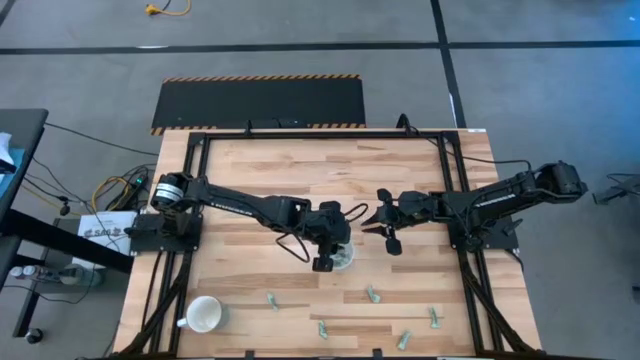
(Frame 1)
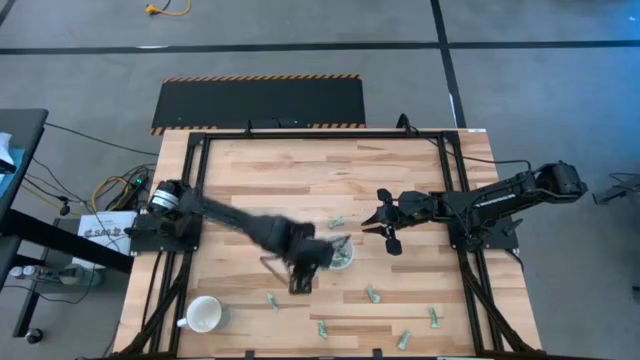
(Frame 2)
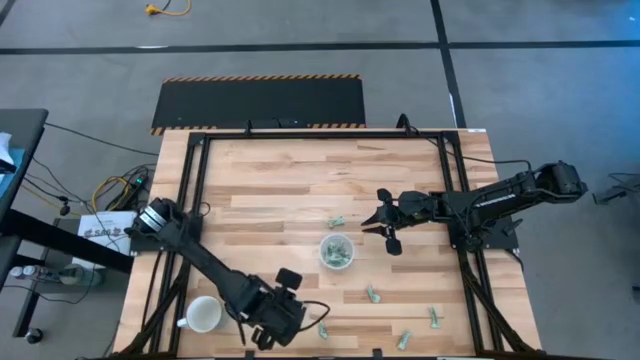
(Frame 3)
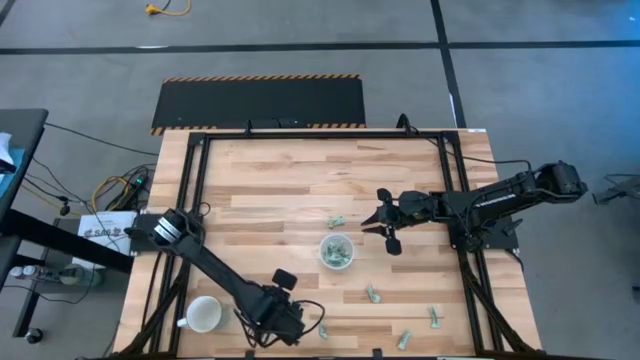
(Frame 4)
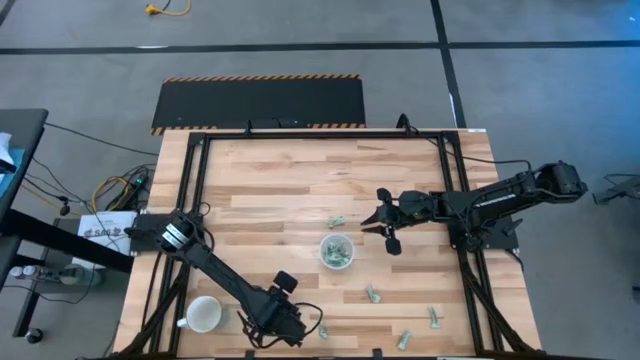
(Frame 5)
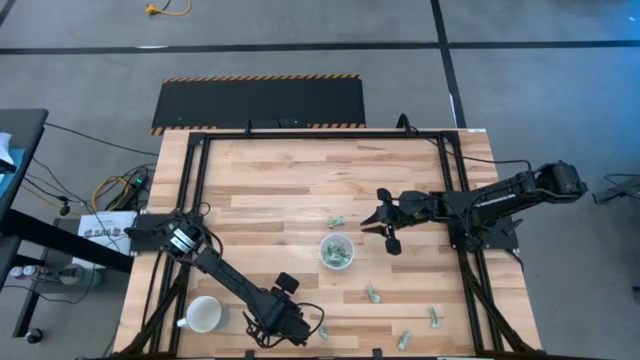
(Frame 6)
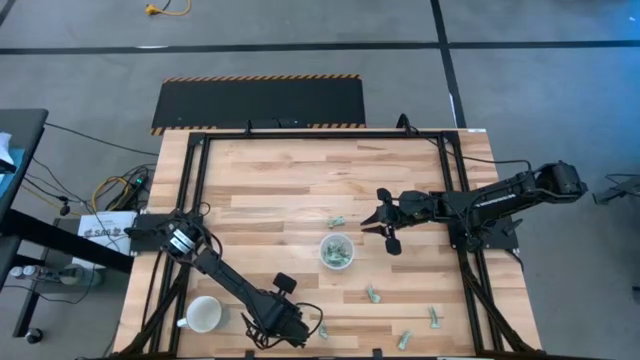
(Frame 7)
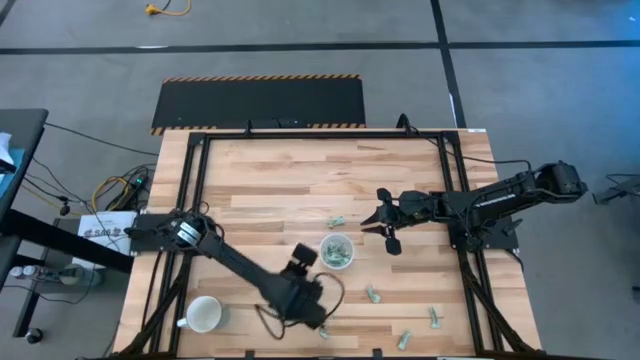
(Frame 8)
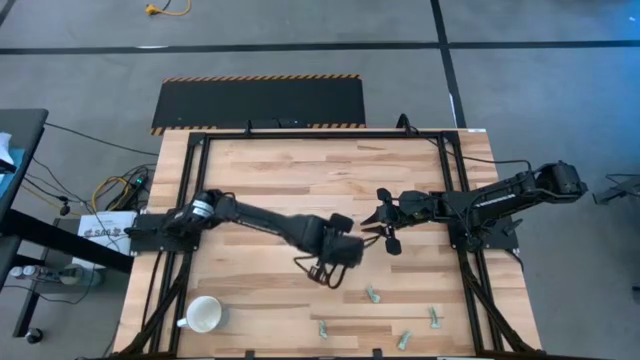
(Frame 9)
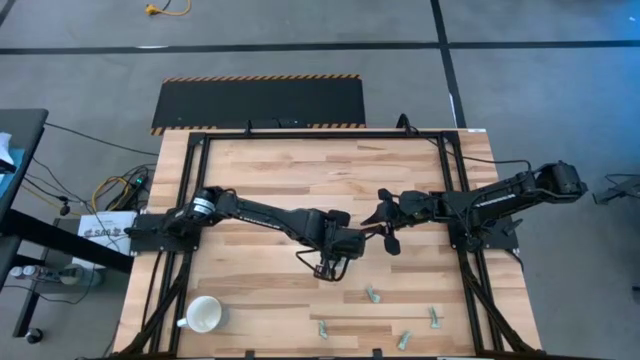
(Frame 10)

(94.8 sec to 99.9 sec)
Task: Pick and place Stevia / Truvia into bins
Put the stevia packet into the transparent container

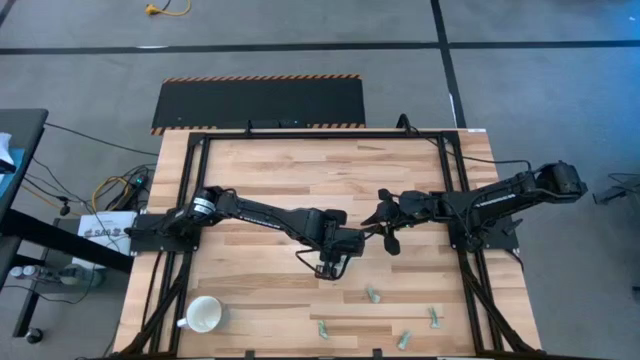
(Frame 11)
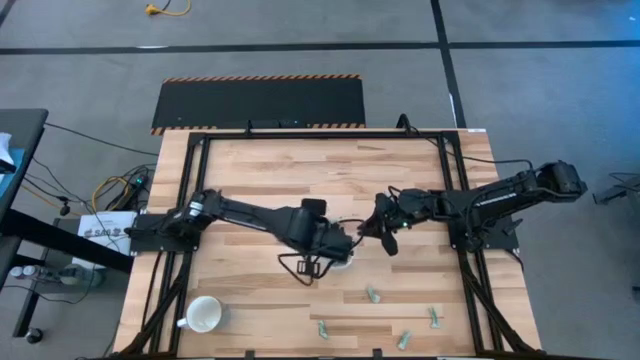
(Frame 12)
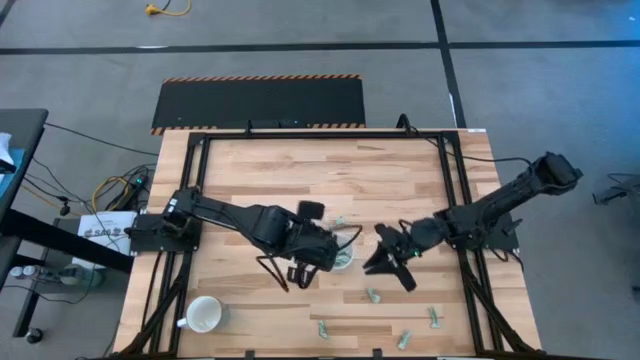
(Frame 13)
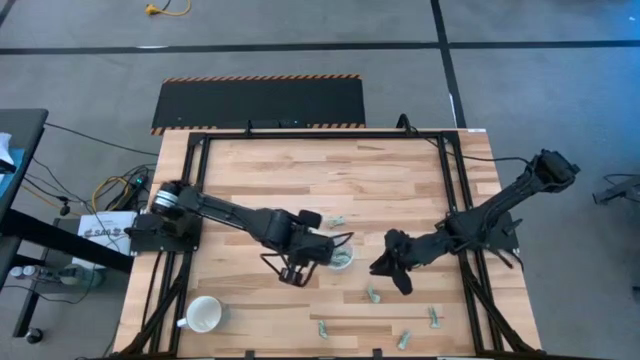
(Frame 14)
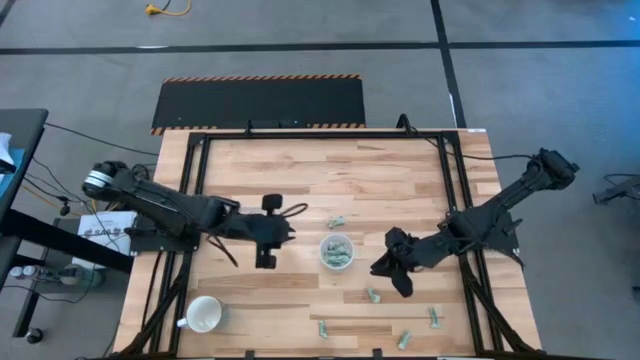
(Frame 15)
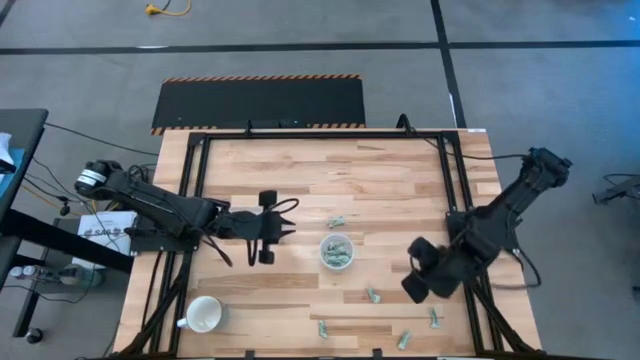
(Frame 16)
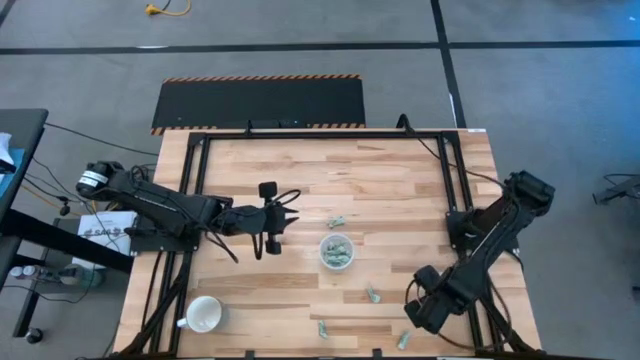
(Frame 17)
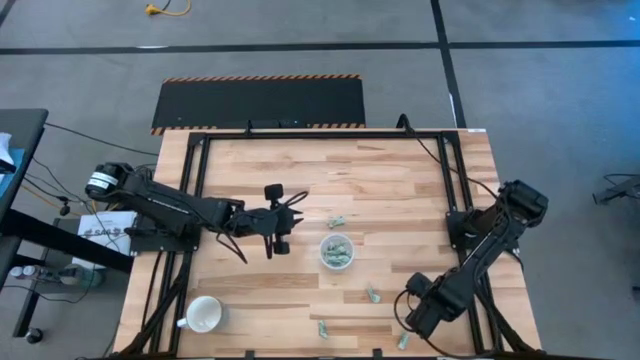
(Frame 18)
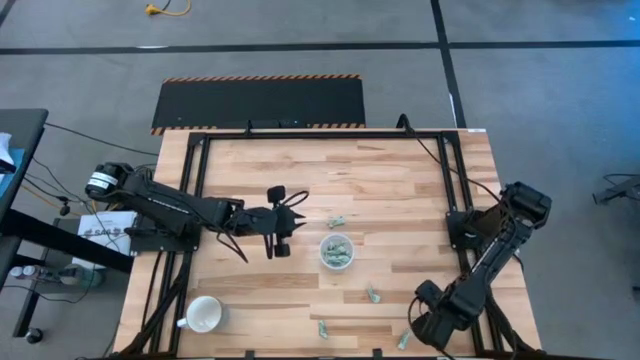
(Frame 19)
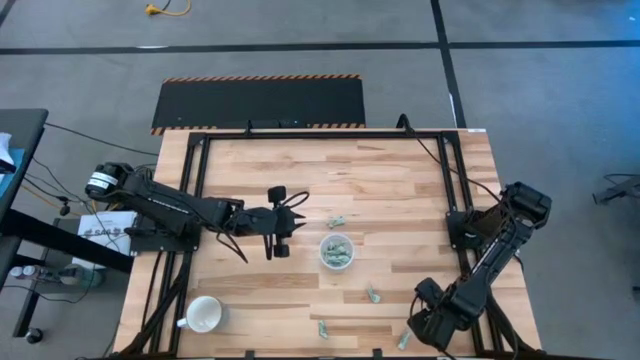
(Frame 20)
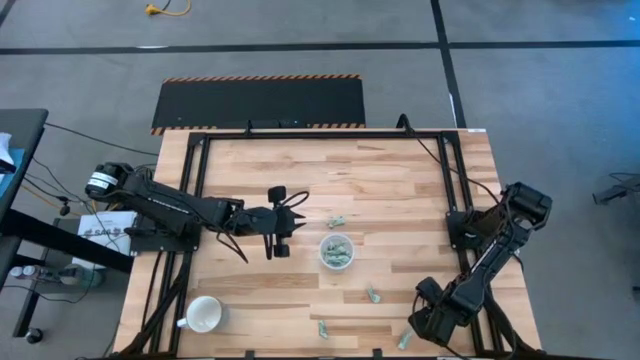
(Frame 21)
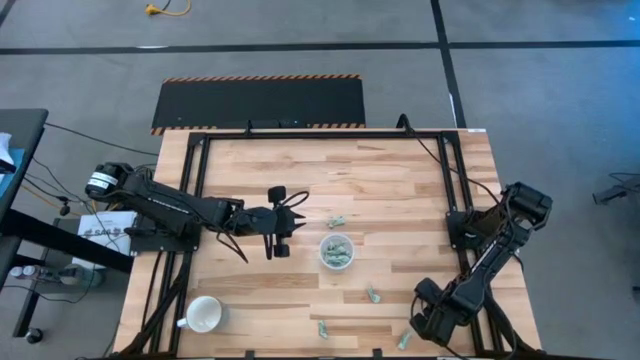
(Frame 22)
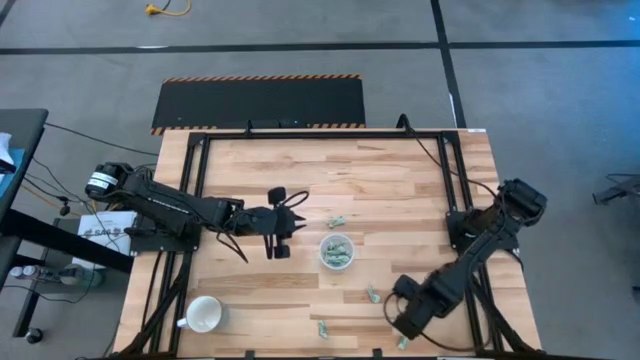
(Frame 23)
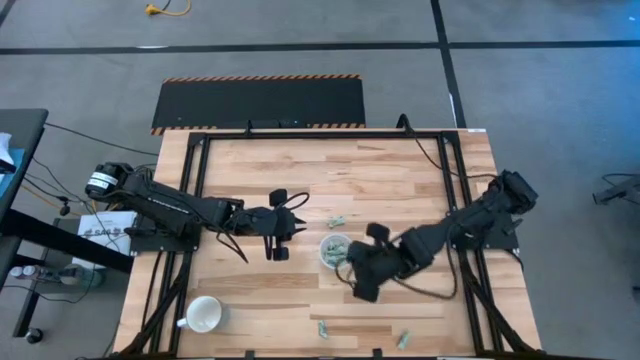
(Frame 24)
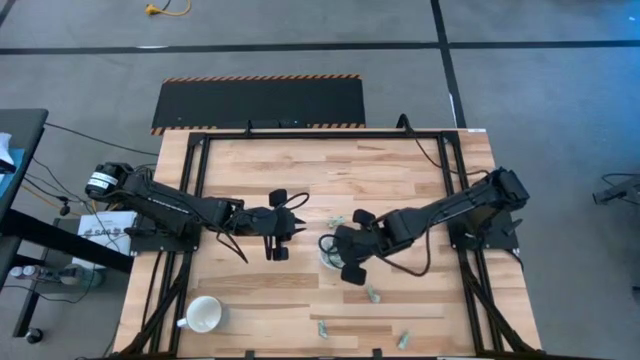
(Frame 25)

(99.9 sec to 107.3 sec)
Put the stevia packet into the transparent container

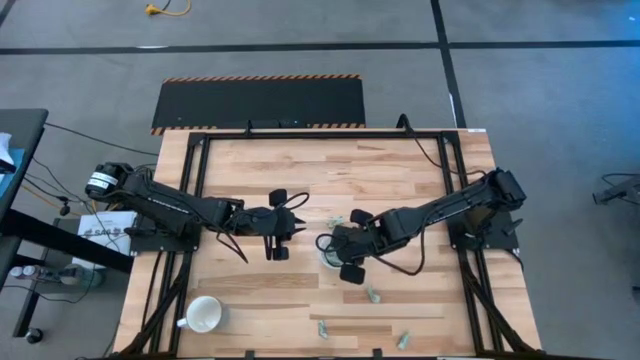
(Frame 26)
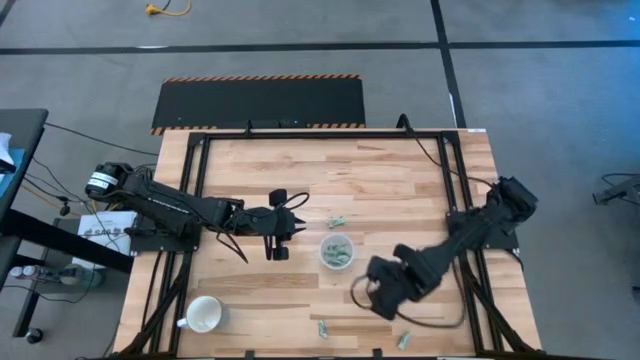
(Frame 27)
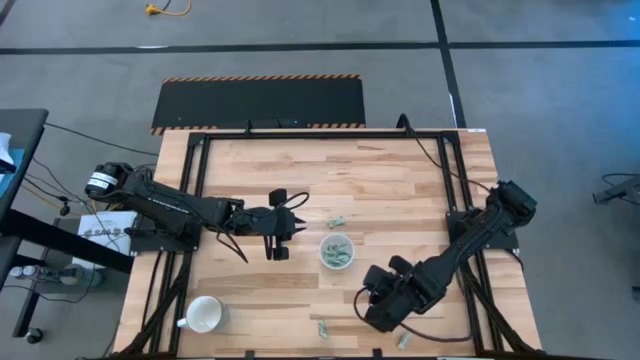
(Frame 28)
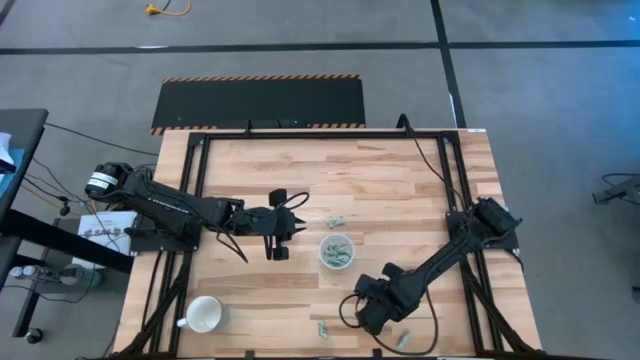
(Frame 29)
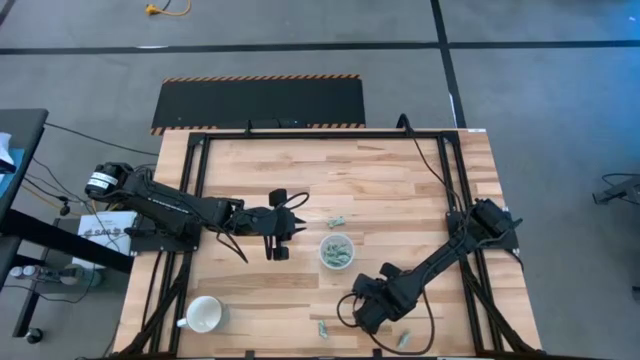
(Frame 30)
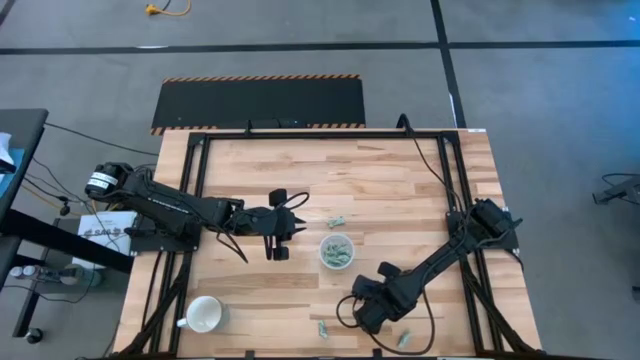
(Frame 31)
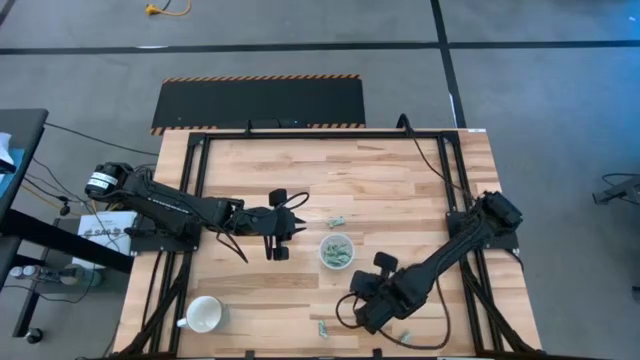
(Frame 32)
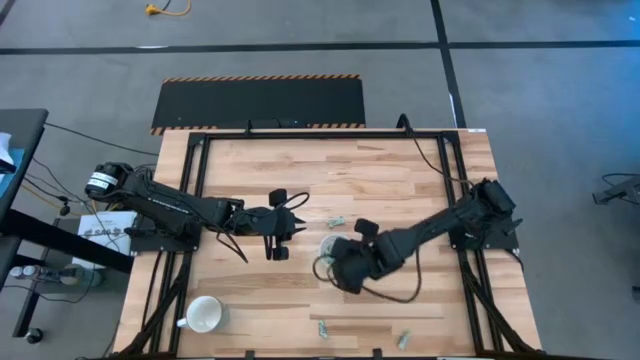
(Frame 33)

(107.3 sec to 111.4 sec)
Put the stevia packet into the transparent container

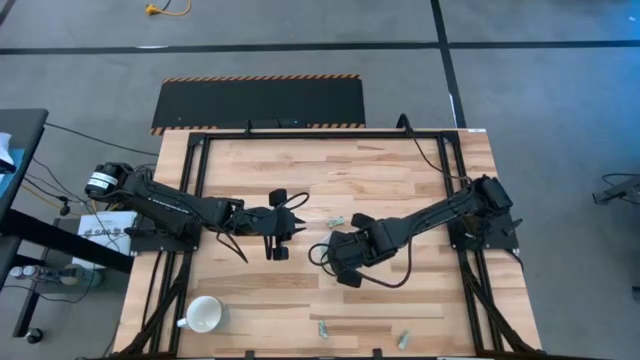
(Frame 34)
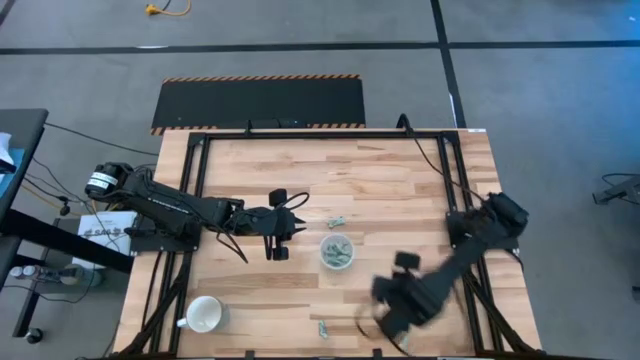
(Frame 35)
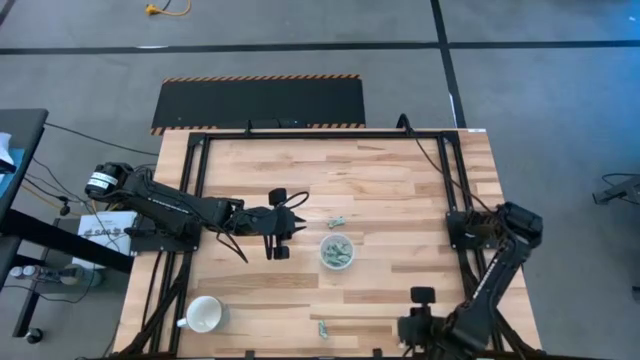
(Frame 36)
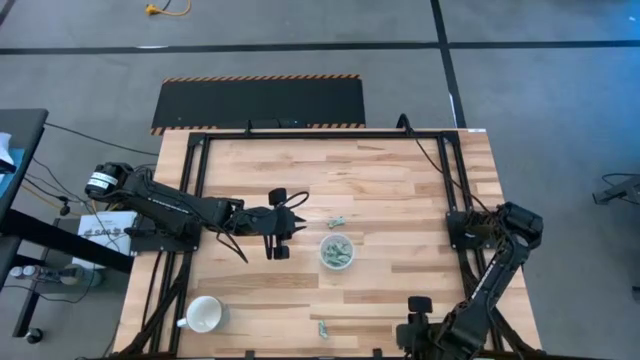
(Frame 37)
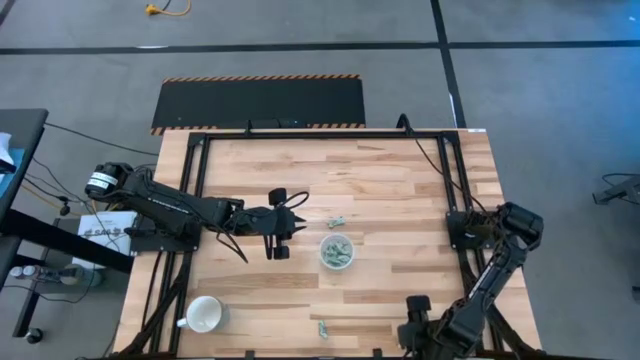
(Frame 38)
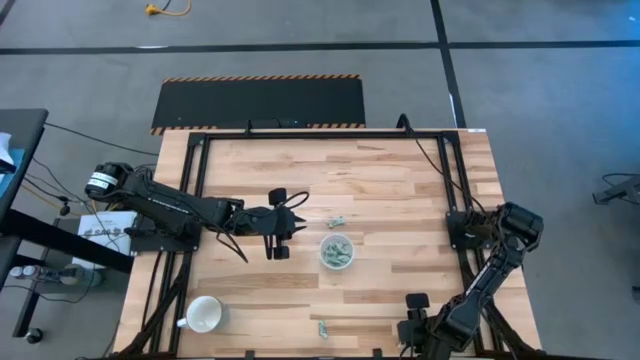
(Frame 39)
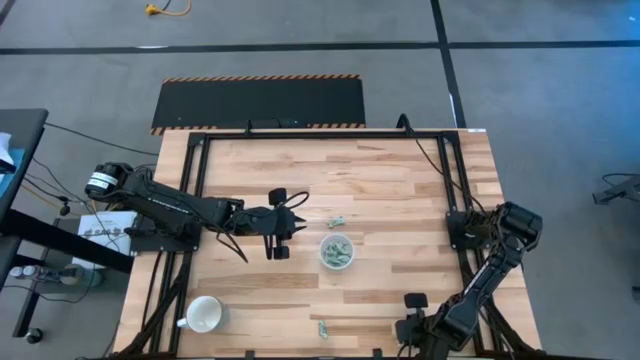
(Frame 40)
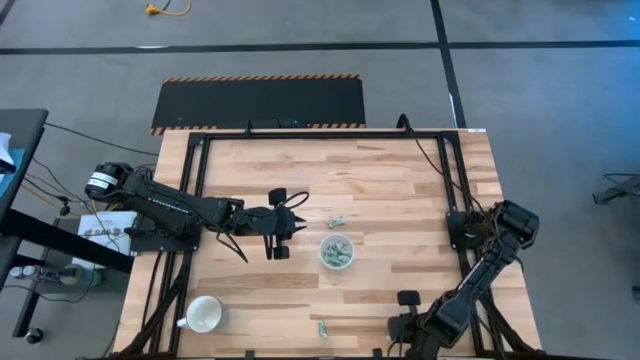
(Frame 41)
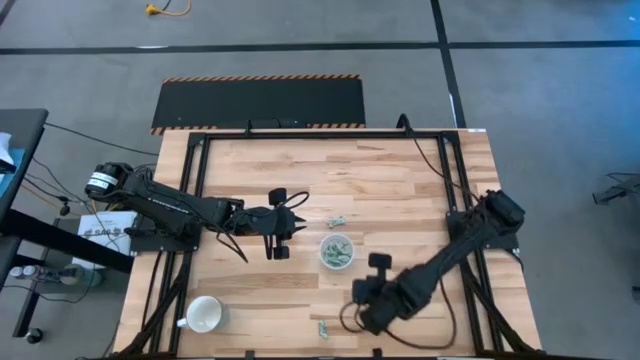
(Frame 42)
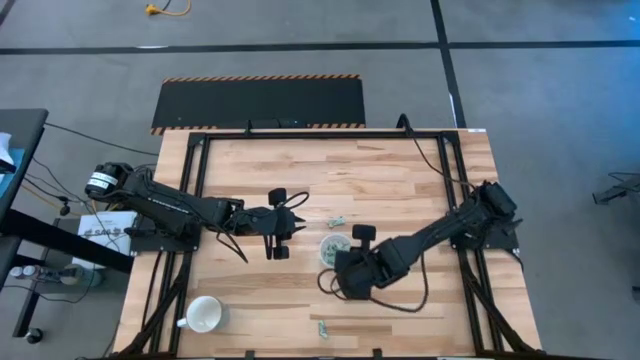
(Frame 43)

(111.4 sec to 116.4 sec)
Put the stevia packet into the transparent container
